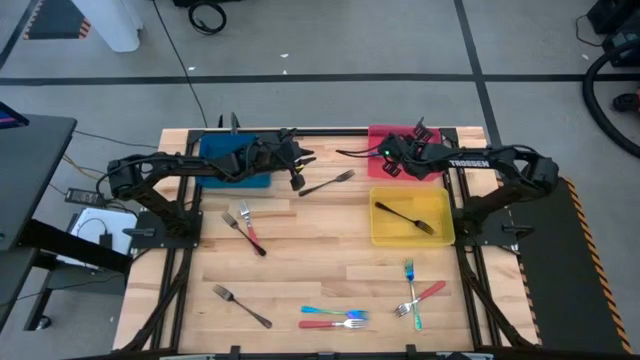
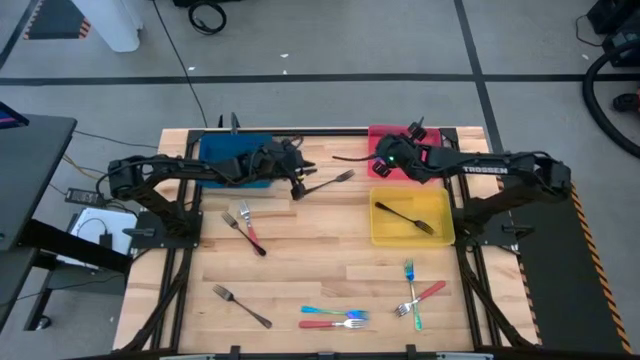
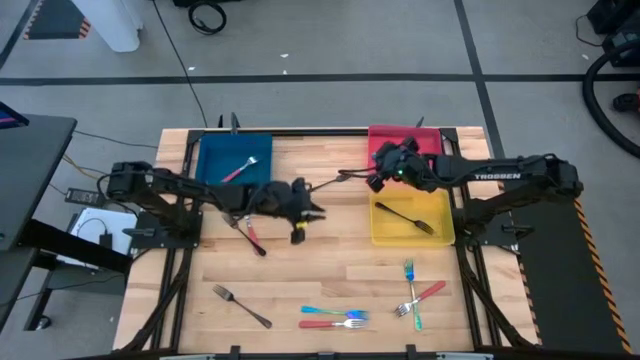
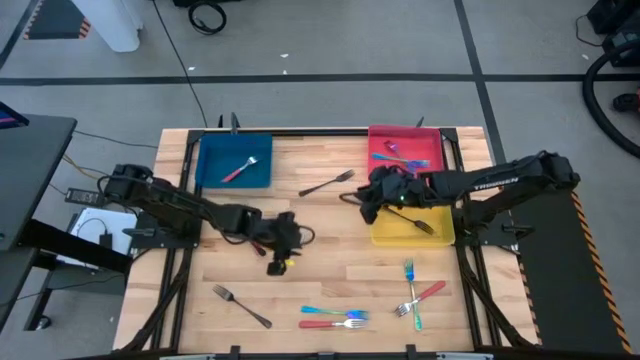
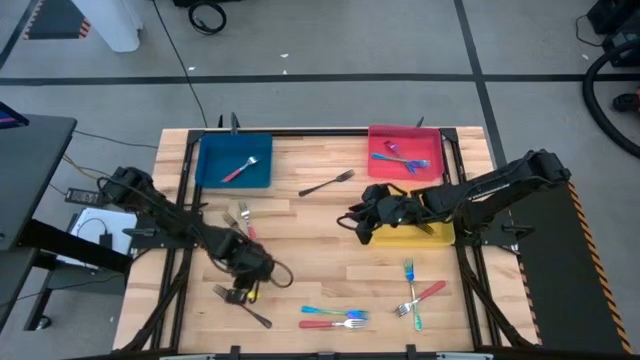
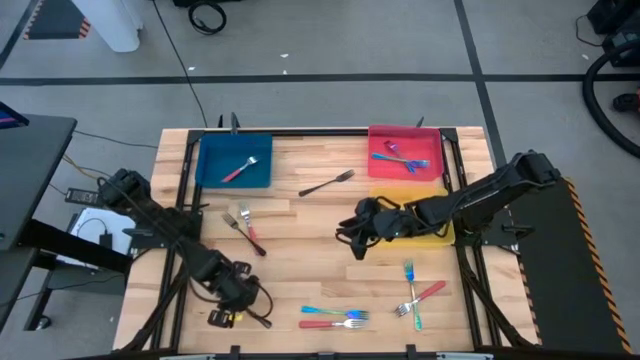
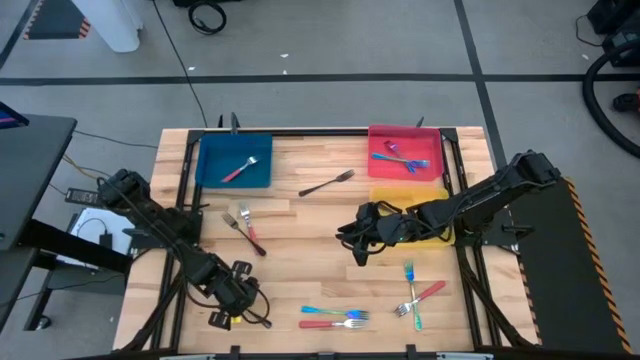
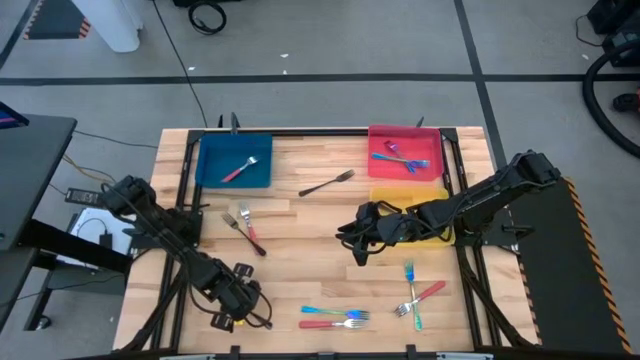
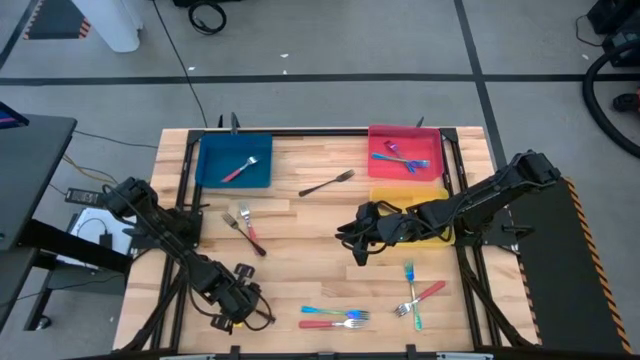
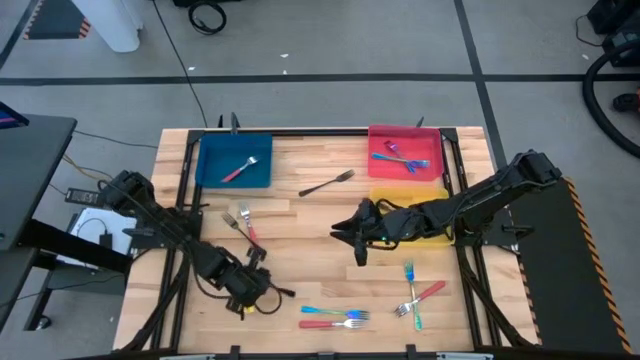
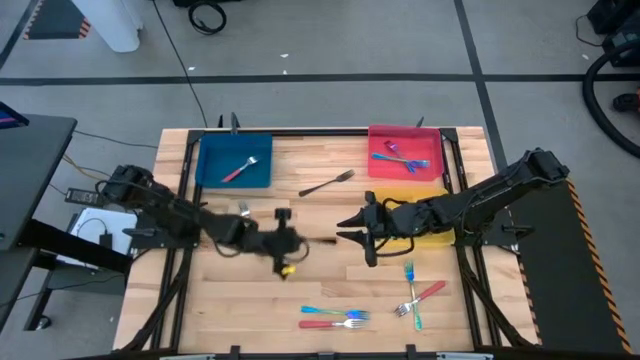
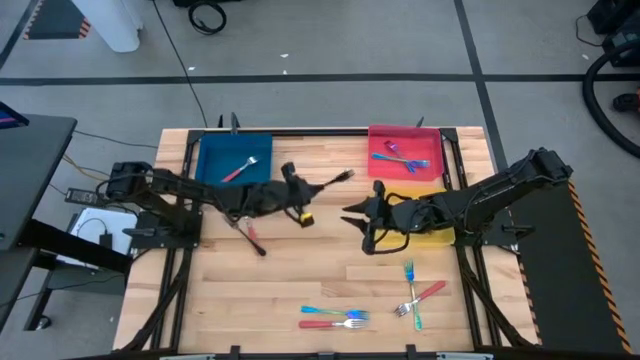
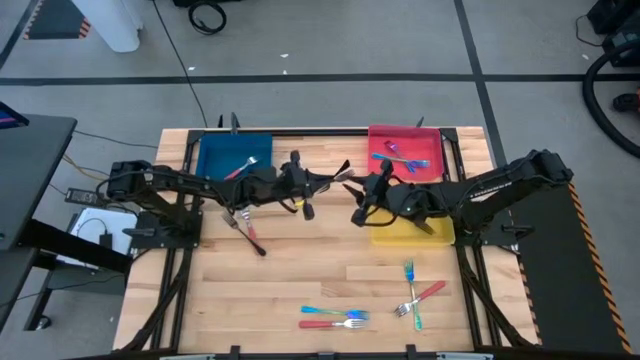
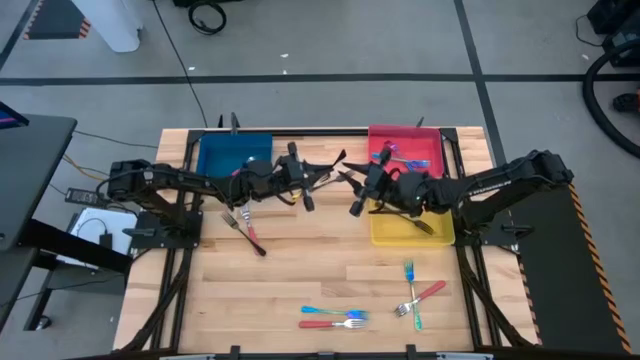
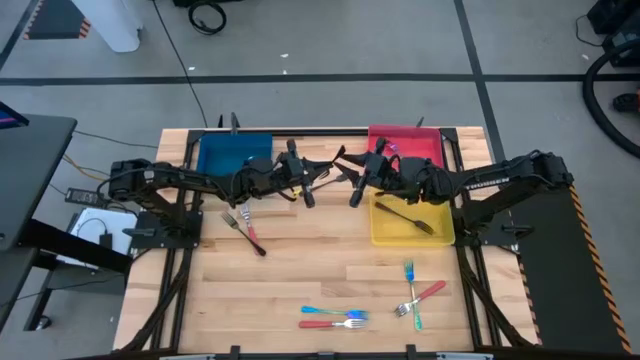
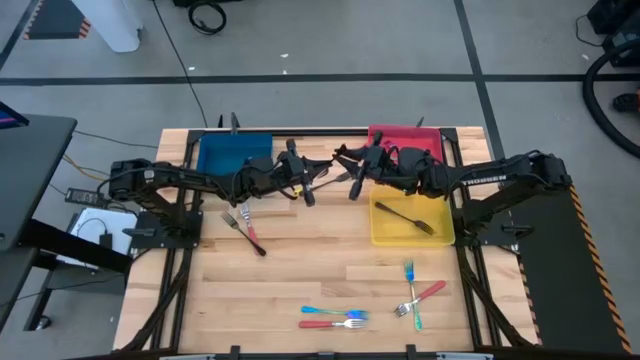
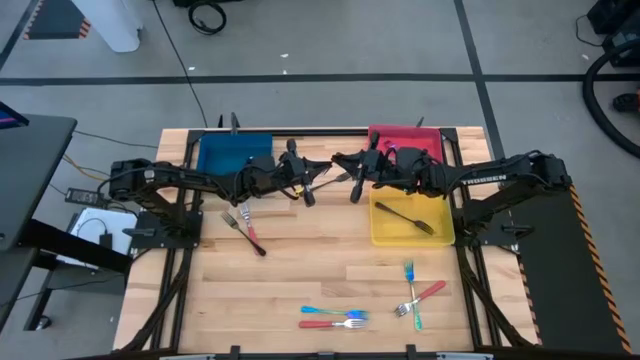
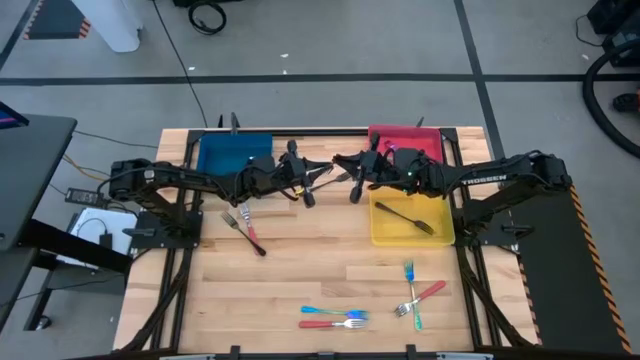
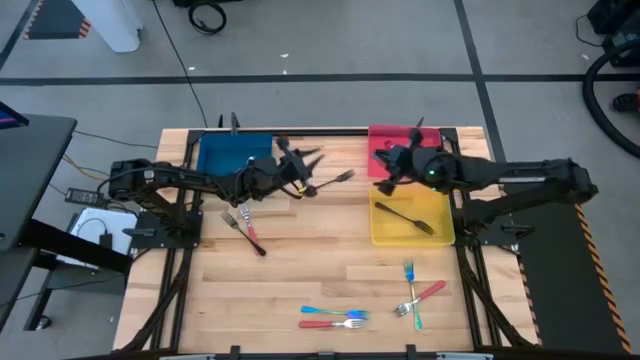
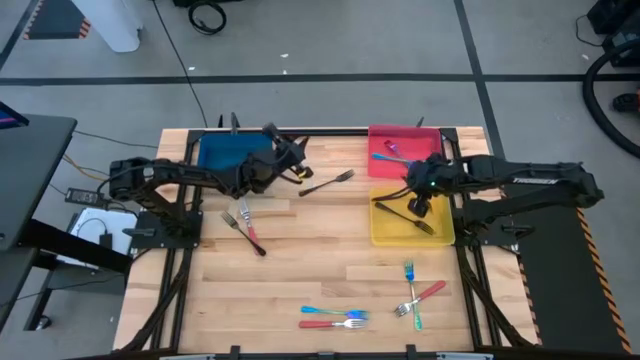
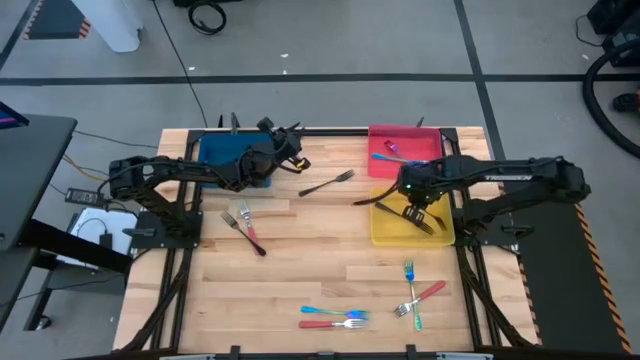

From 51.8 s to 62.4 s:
Task: Sort silverware by color (type)
Put the black fork into the yellow bin

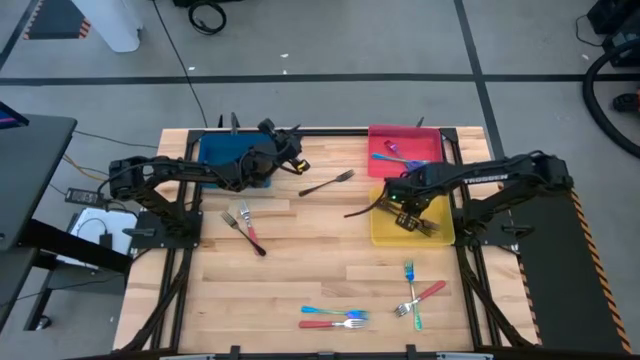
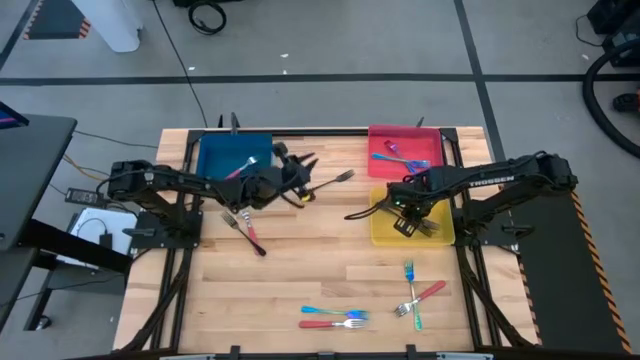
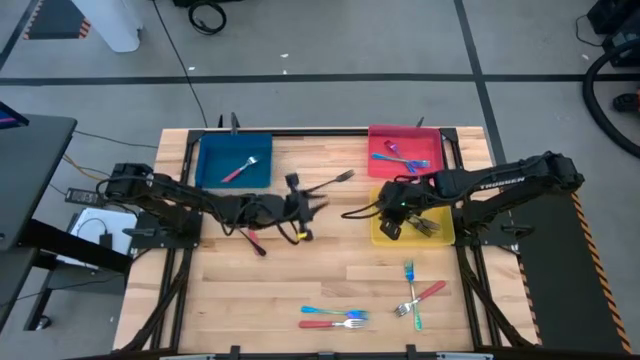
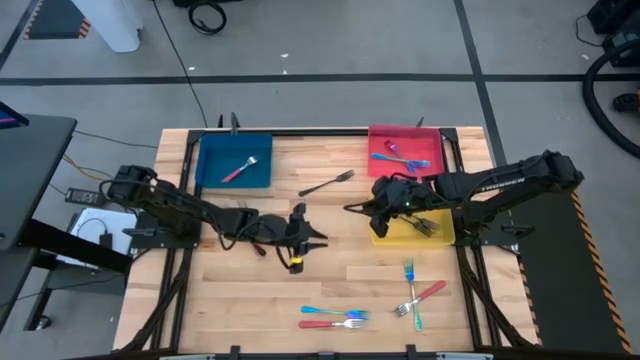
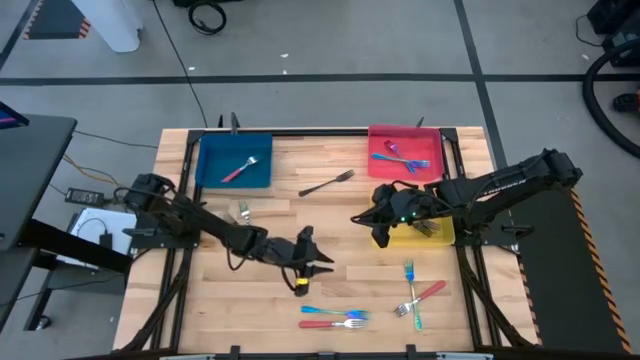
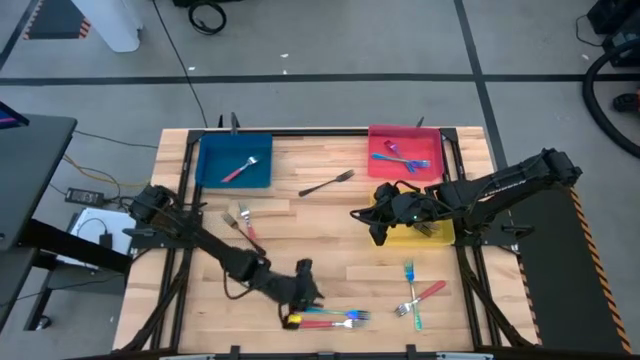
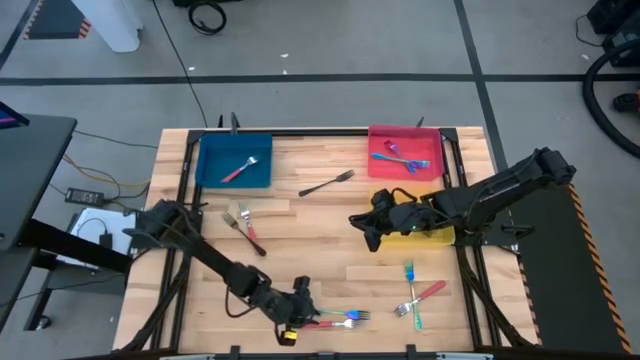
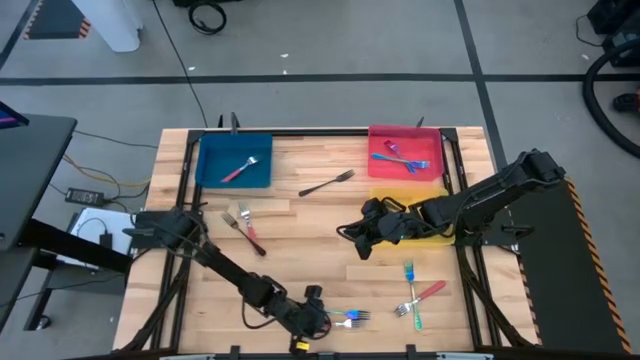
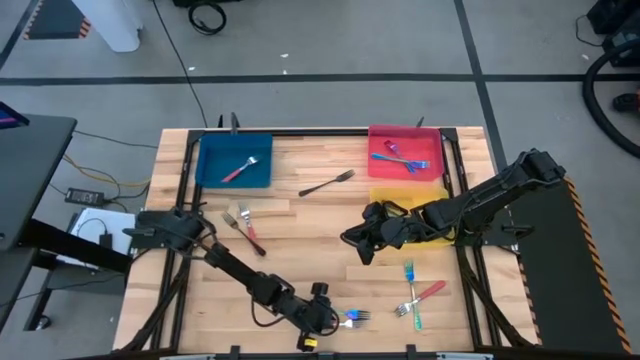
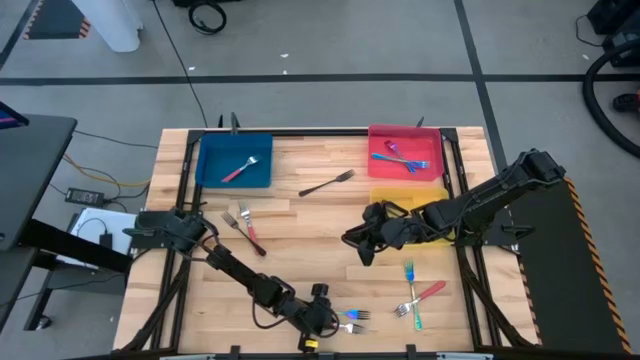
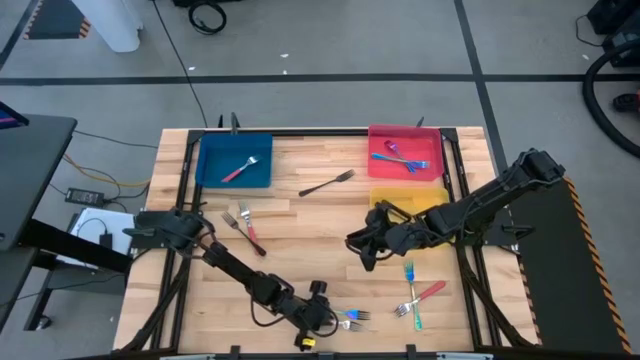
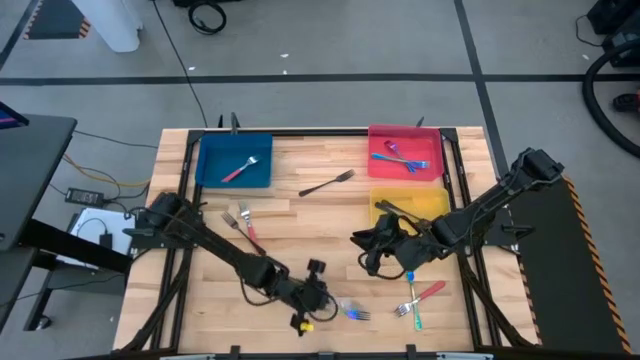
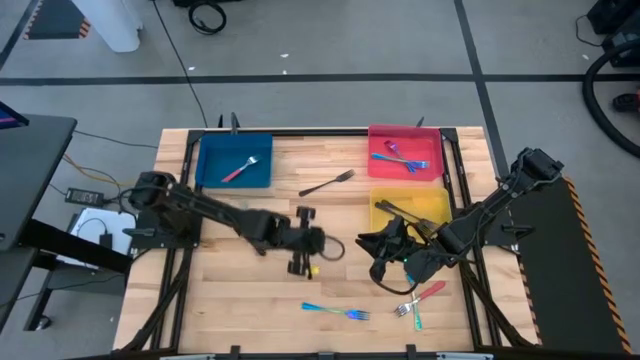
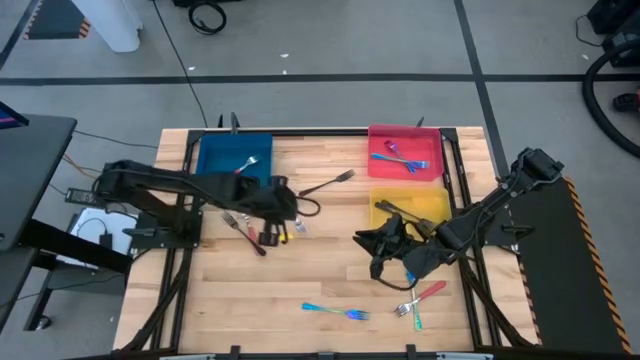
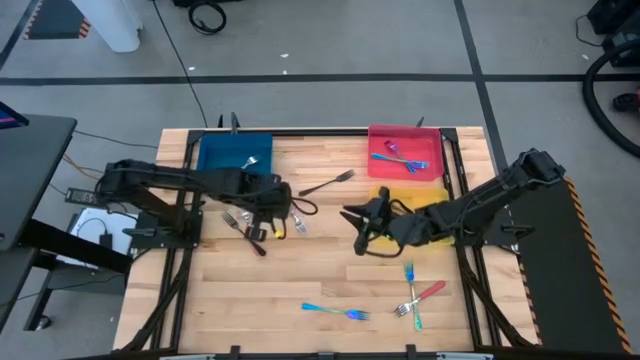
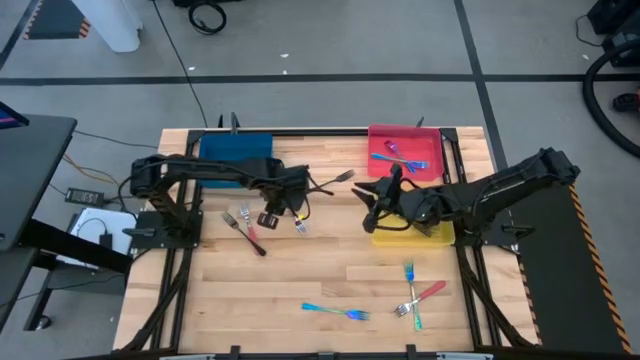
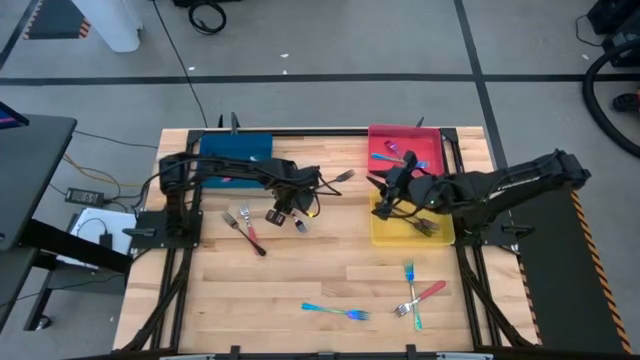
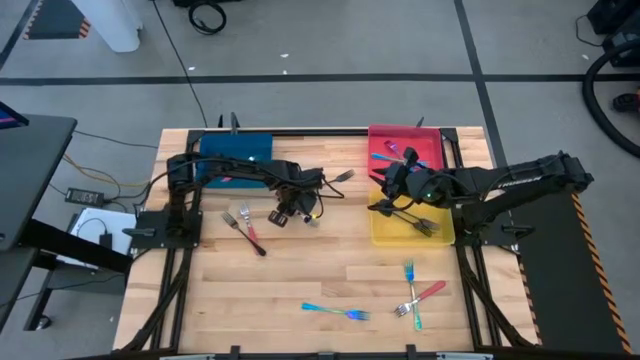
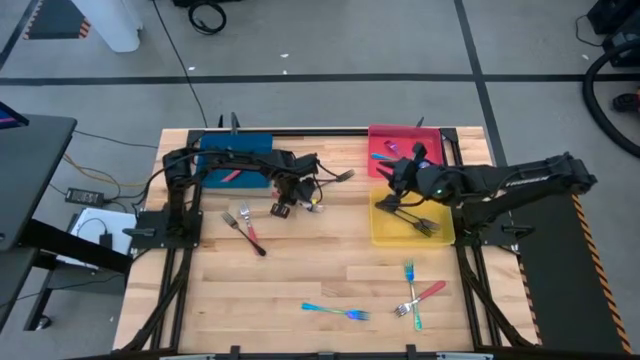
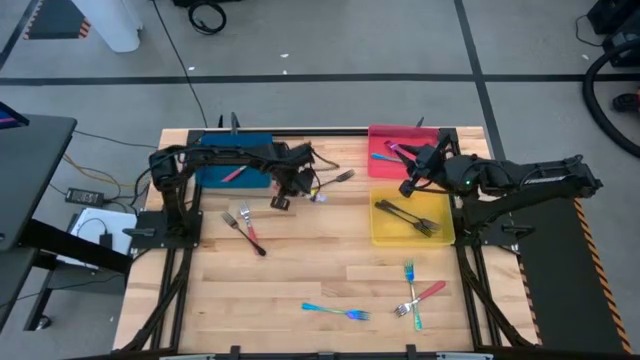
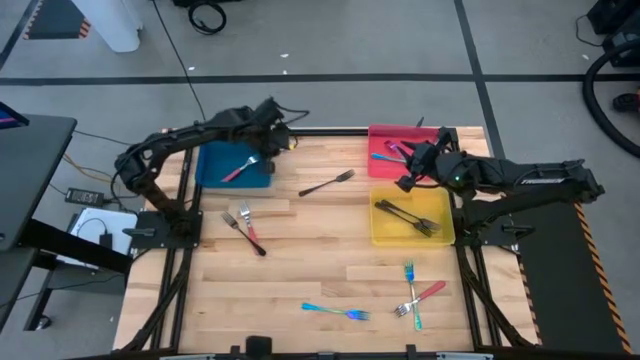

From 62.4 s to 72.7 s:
Put the red fork into the blue bin

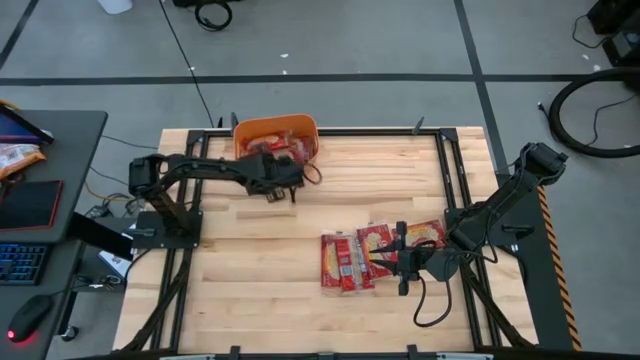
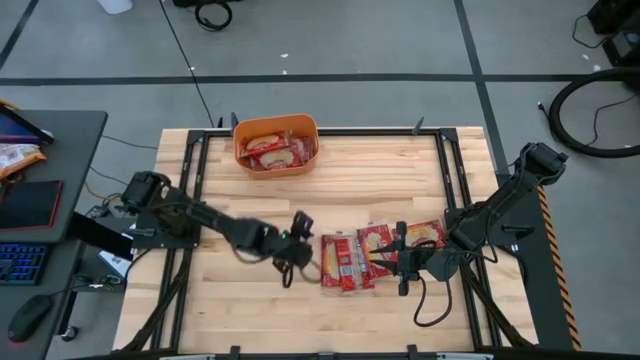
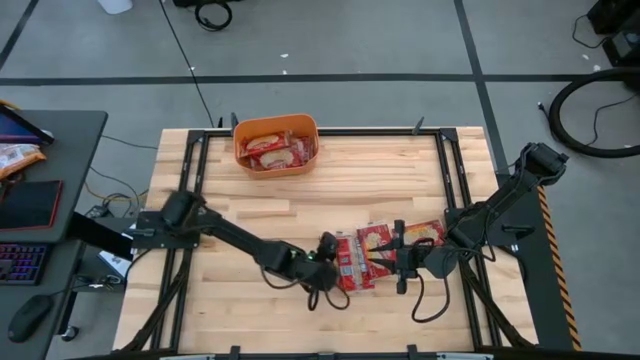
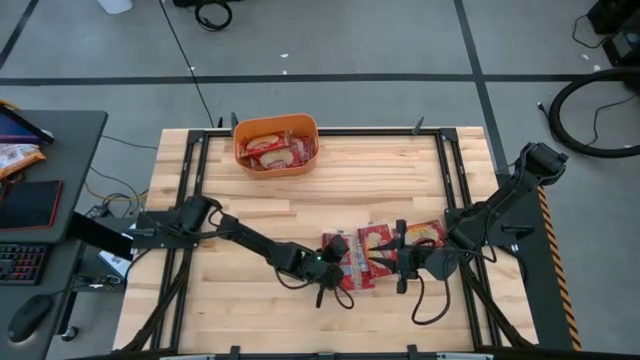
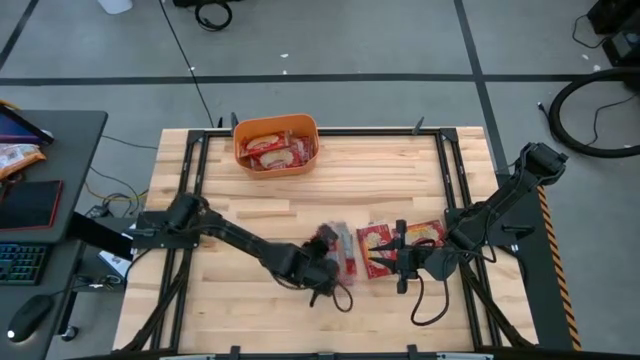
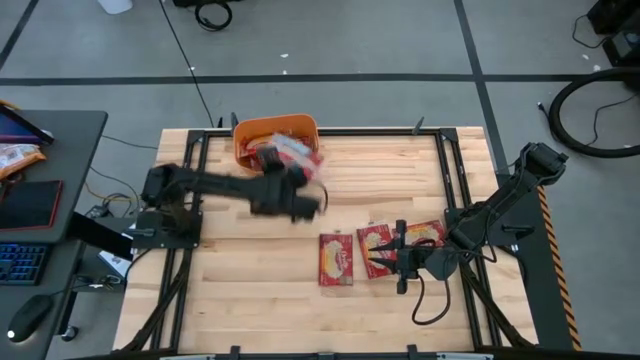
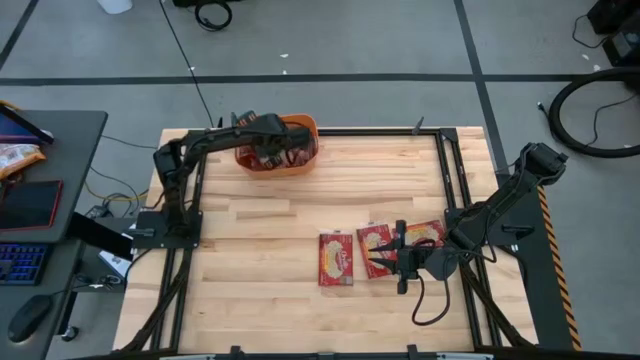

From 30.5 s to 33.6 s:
Task: Sort popcorn bags into baskets
Put the red popcorn bag into the orange bin
